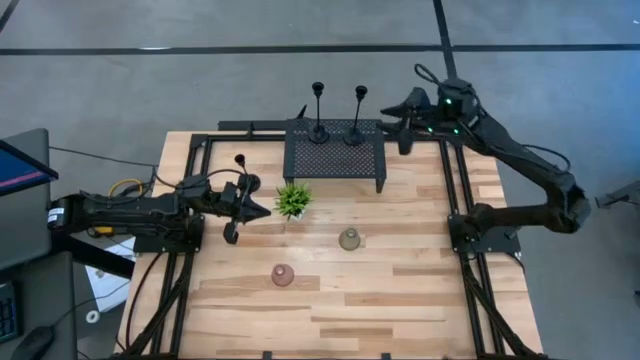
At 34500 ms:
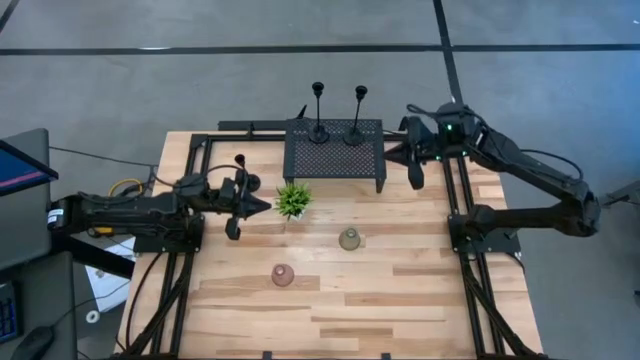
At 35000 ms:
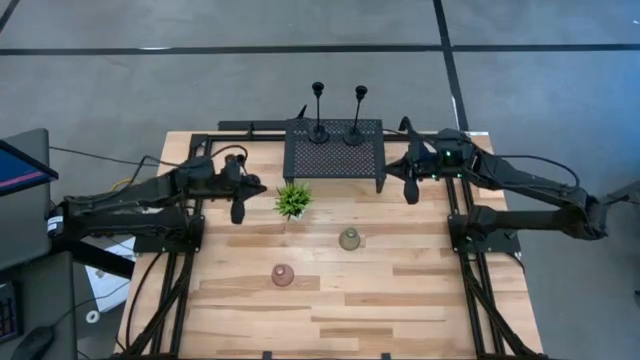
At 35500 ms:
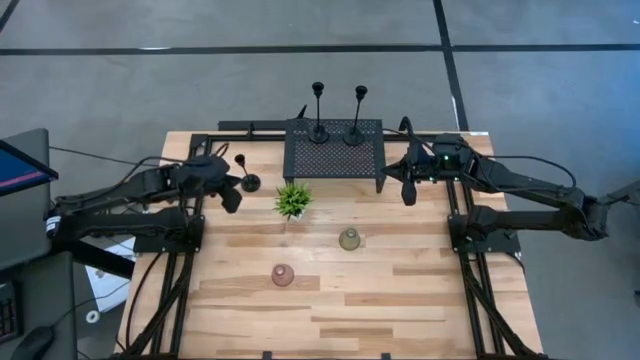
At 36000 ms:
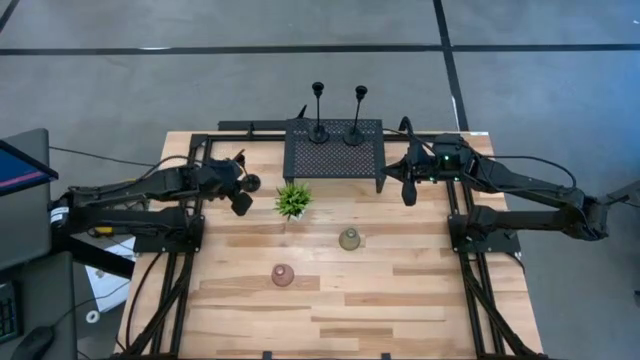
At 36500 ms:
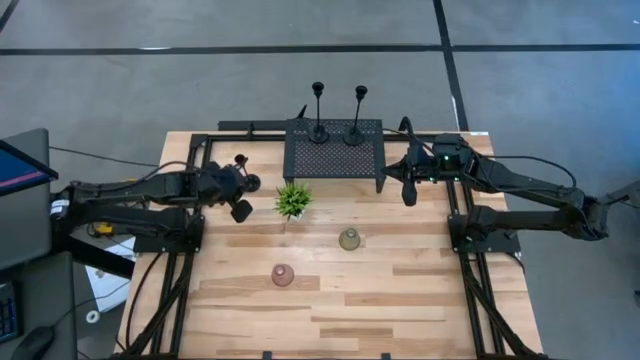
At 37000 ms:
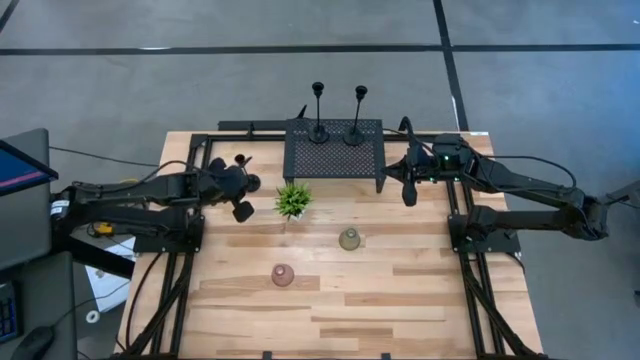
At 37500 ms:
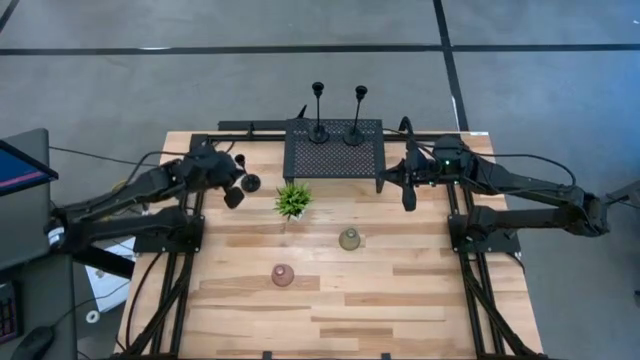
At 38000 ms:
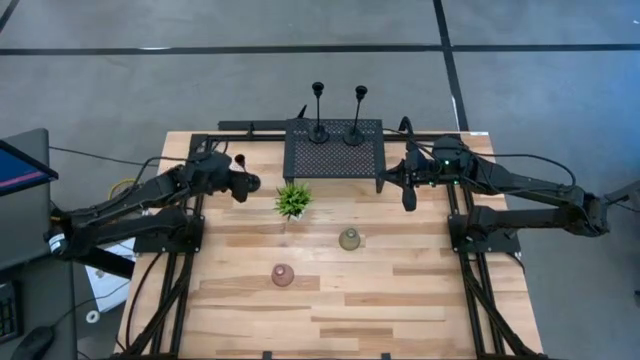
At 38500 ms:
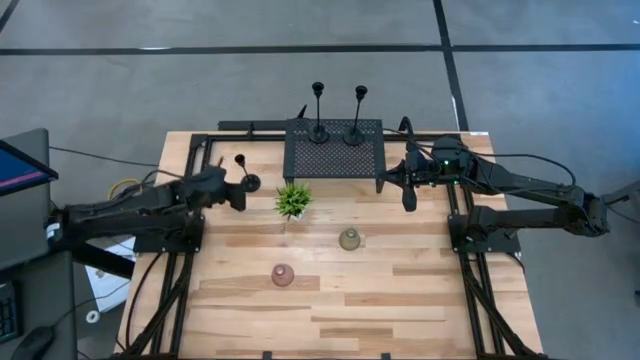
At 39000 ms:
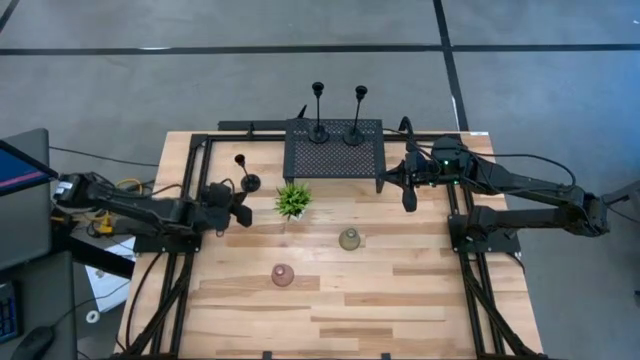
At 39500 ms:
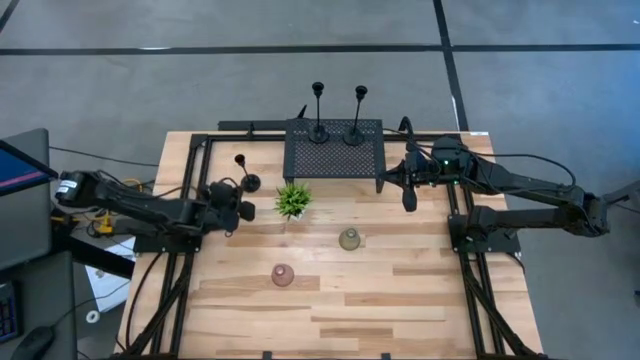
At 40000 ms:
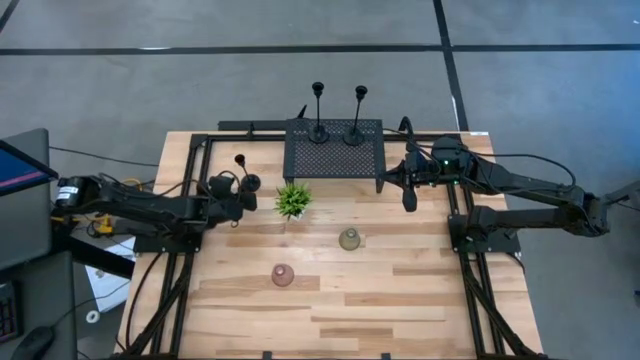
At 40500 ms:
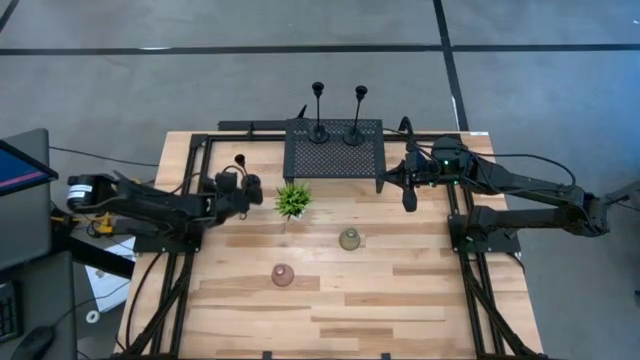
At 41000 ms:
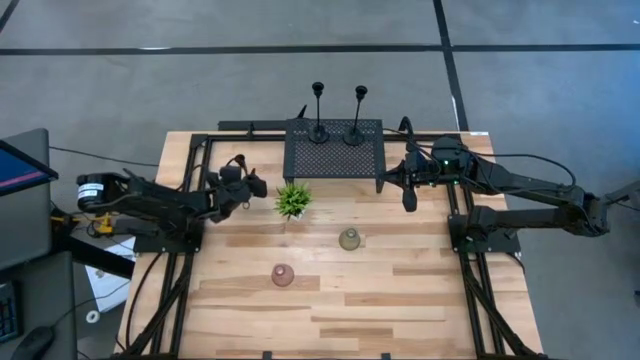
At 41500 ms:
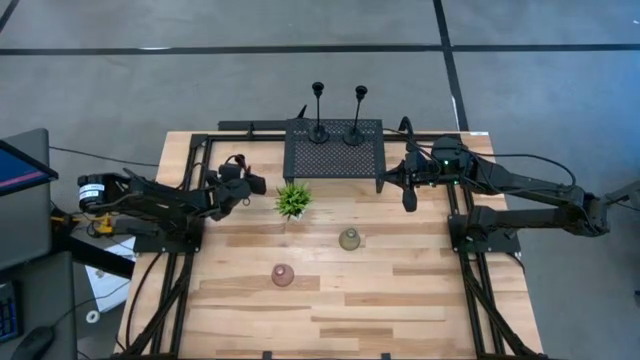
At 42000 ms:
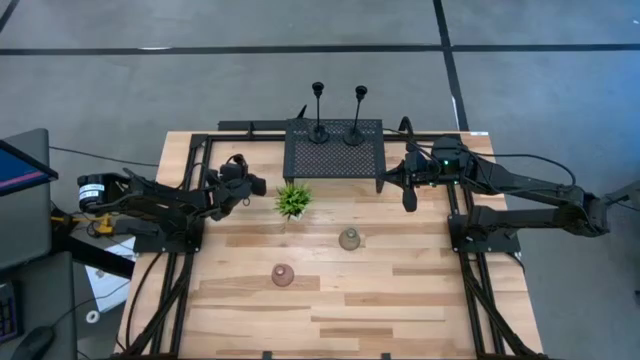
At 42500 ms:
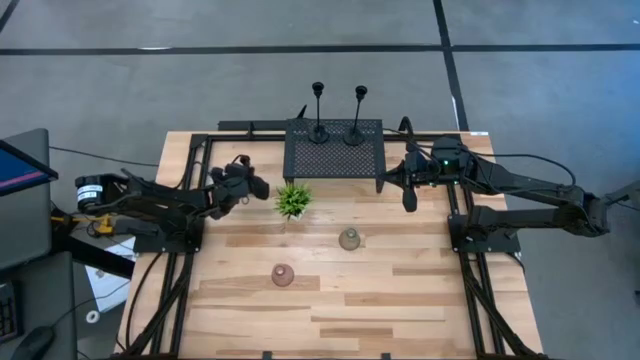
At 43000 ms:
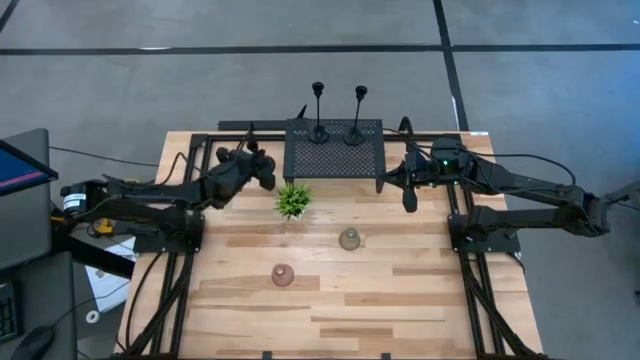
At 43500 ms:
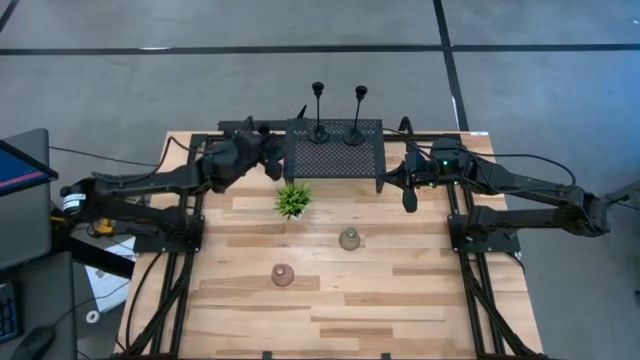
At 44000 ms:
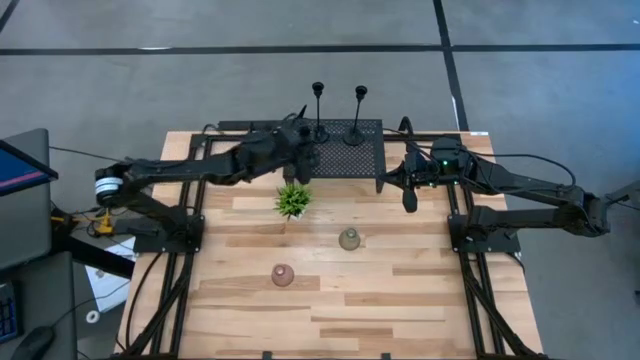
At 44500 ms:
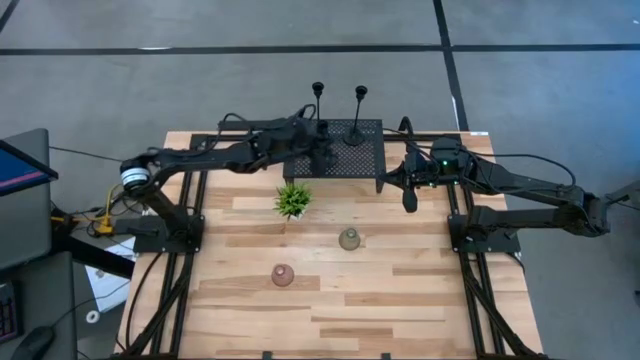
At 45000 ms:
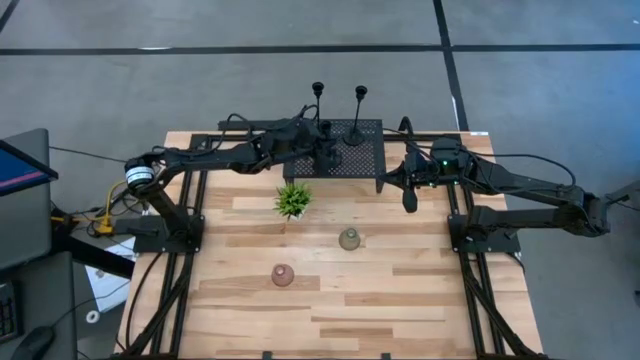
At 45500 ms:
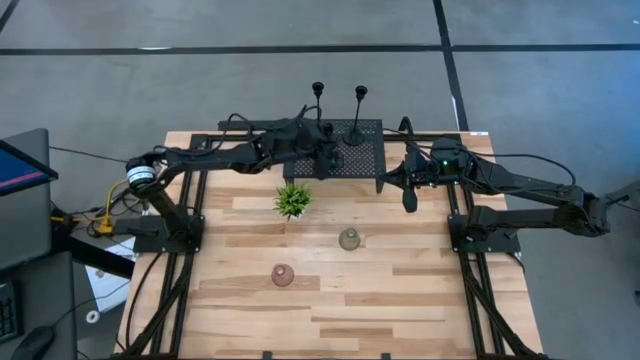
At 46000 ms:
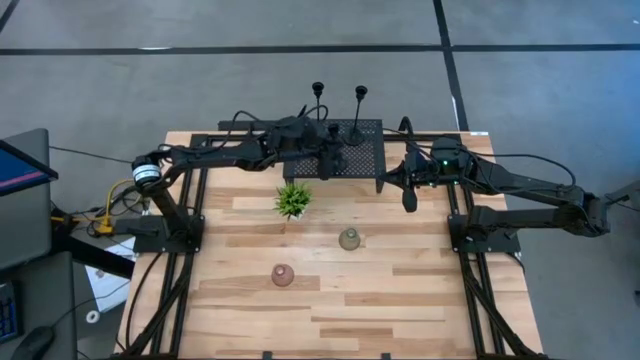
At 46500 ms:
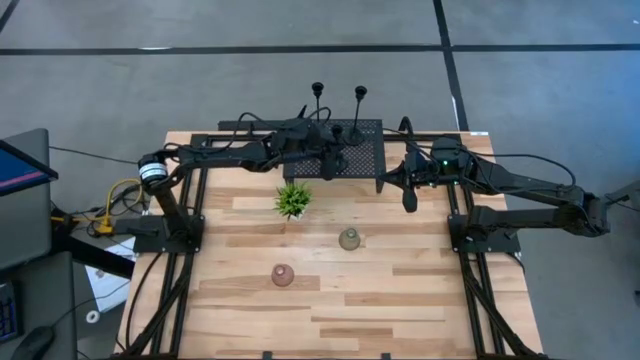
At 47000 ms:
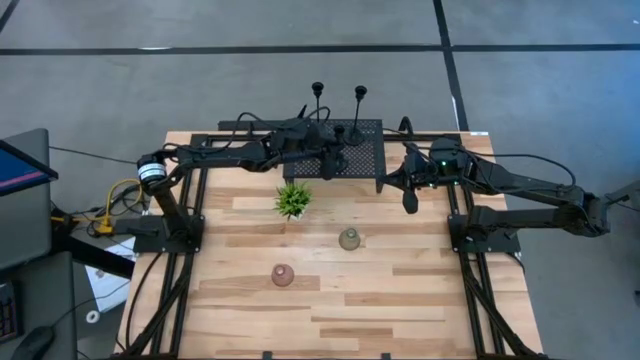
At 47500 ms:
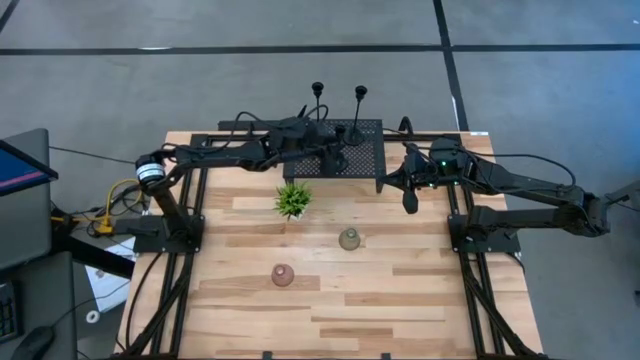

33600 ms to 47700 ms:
Task: Pick & Place candle stick holders
Put the black candle holder on the shelf

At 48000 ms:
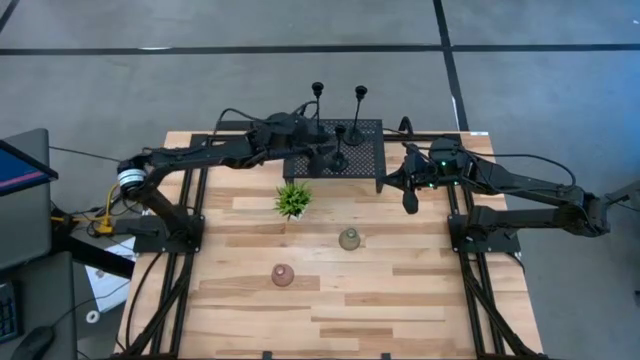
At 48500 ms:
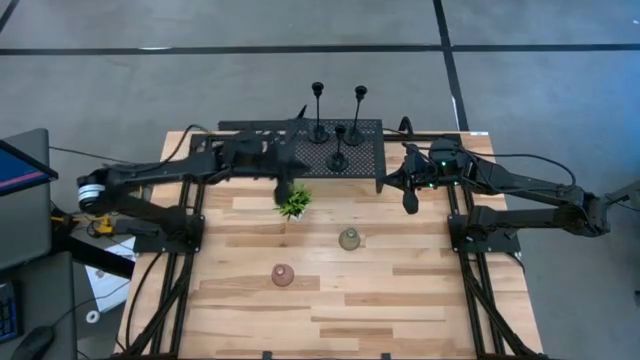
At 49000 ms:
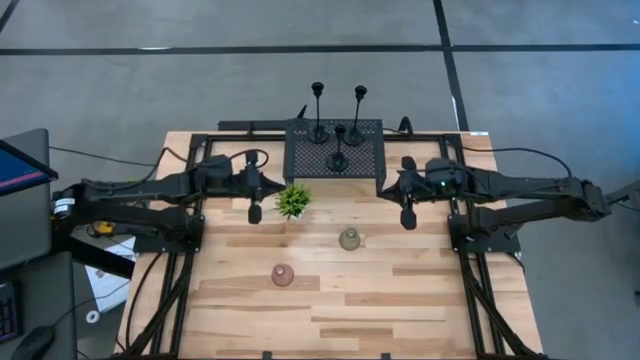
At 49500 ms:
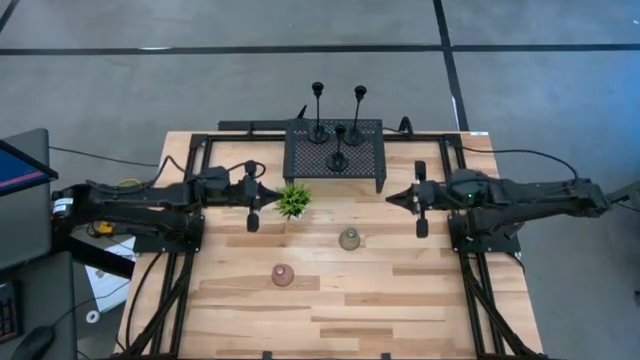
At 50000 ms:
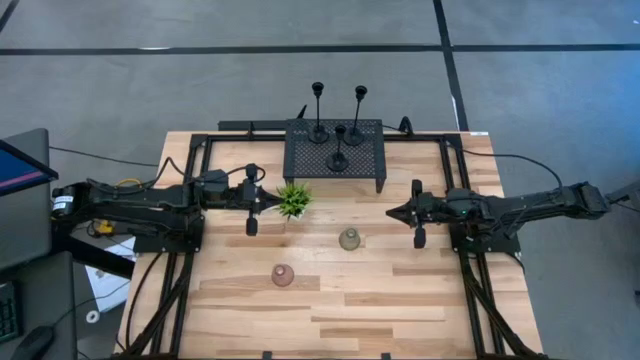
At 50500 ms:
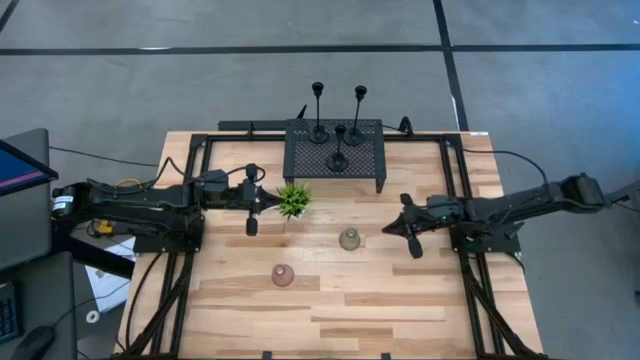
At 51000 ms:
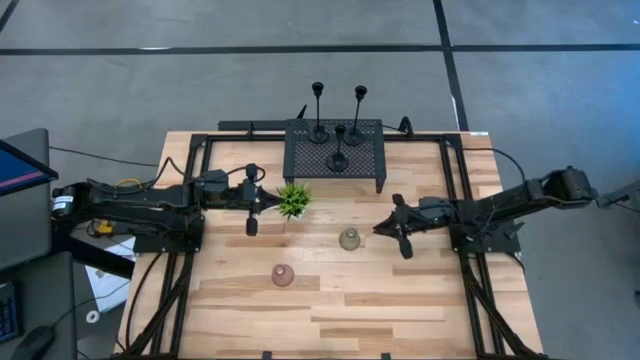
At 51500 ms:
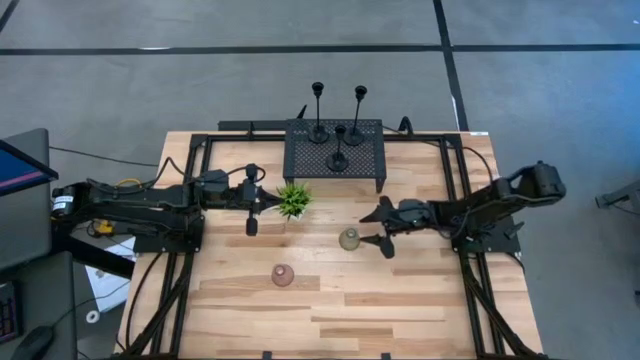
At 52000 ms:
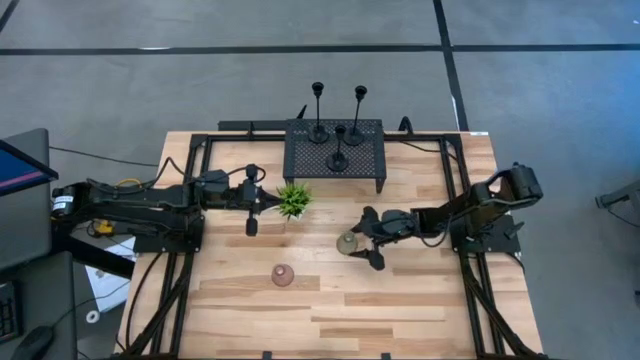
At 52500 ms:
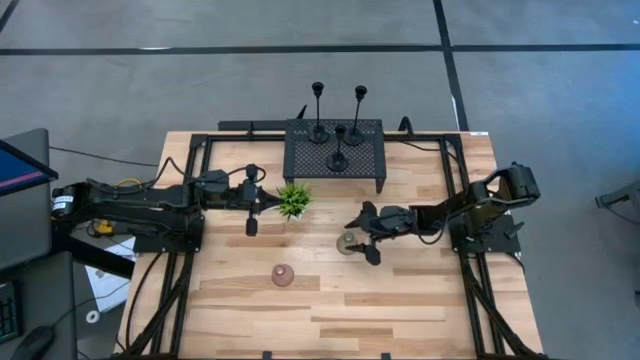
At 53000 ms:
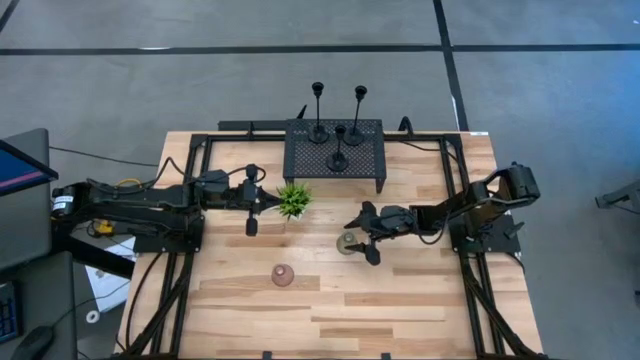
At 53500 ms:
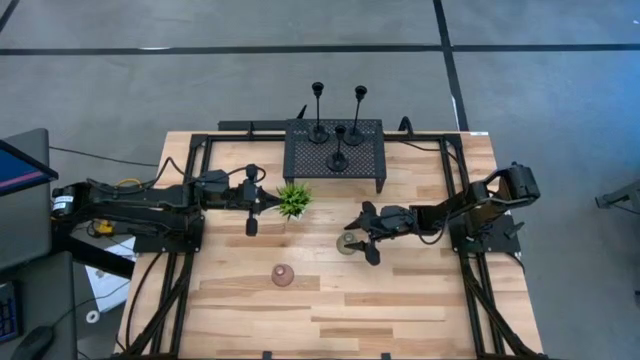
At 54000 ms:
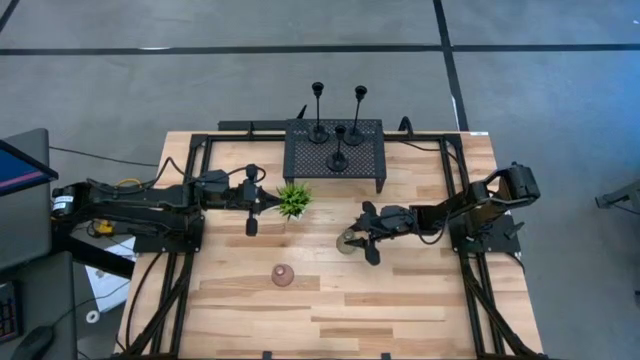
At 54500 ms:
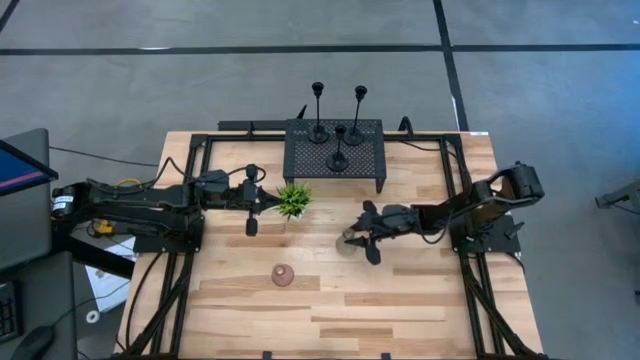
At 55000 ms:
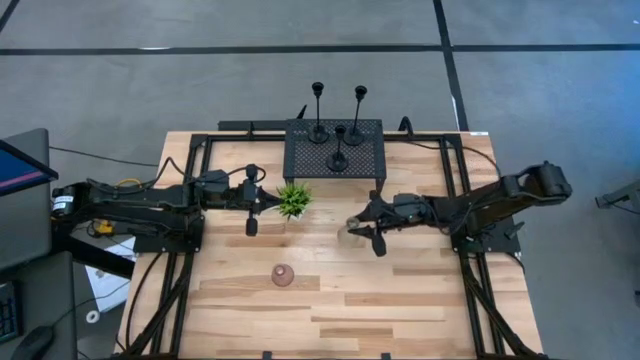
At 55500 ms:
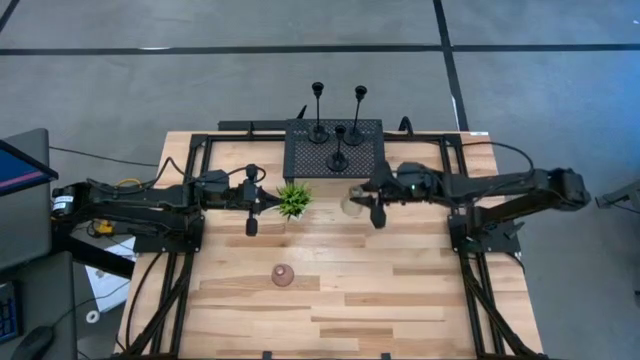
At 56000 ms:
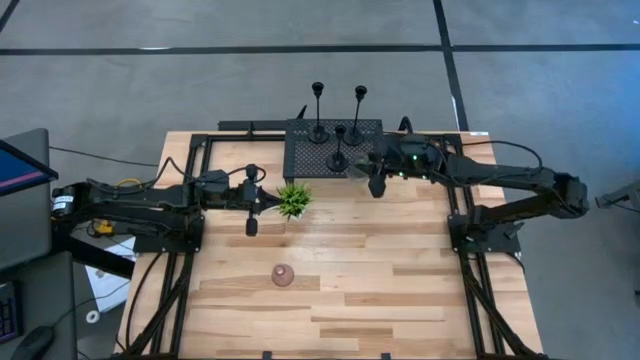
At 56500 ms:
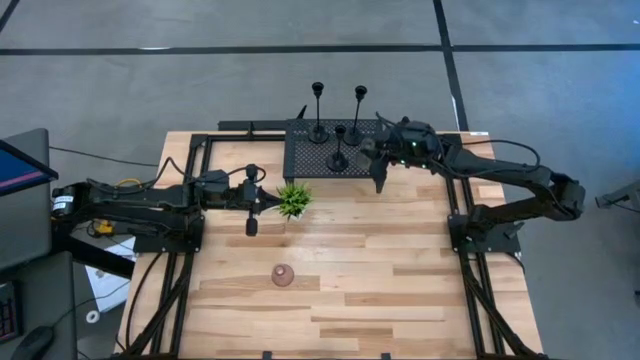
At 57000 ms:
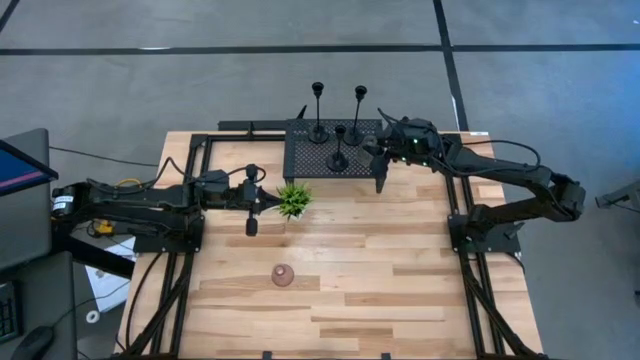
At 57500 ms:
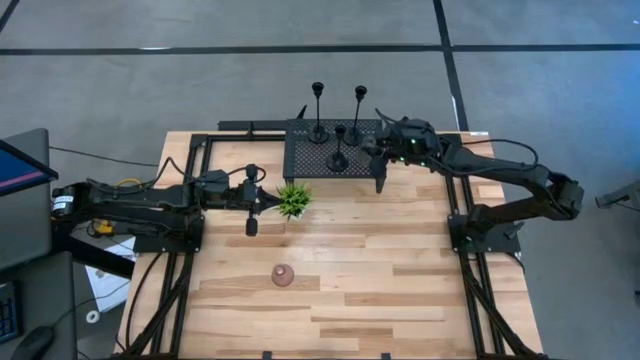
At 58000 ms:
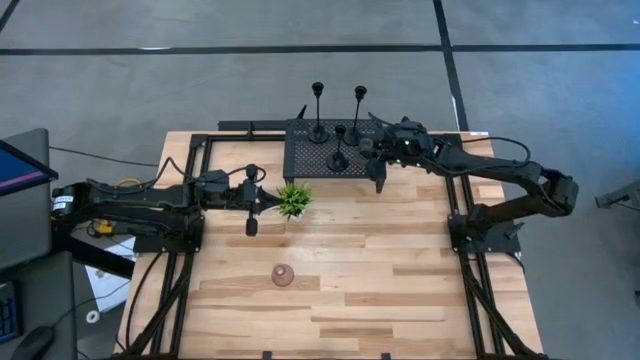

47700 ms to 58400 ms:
Put the green glass candle holder on the shelf
